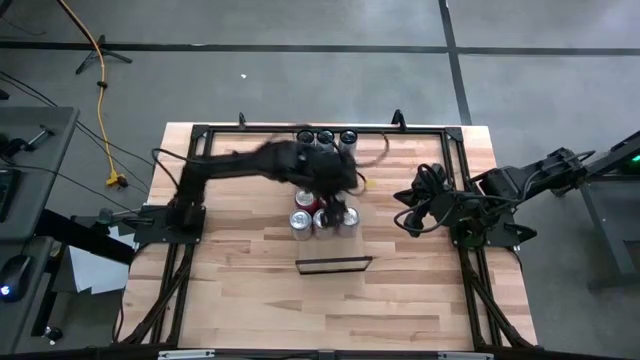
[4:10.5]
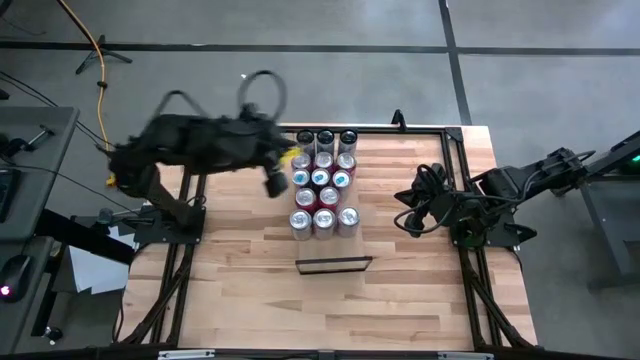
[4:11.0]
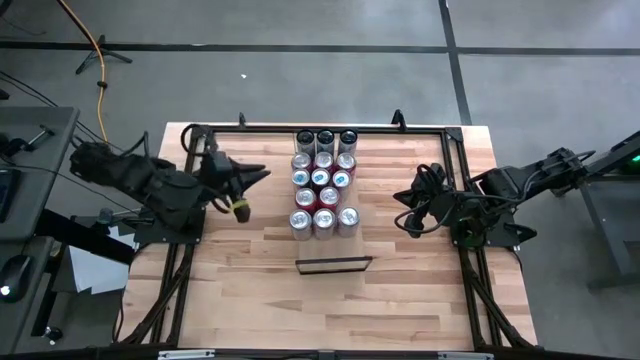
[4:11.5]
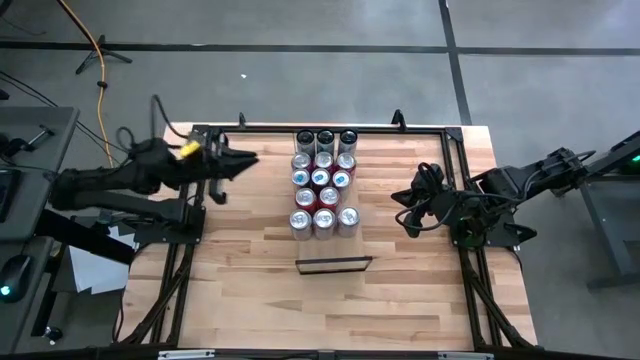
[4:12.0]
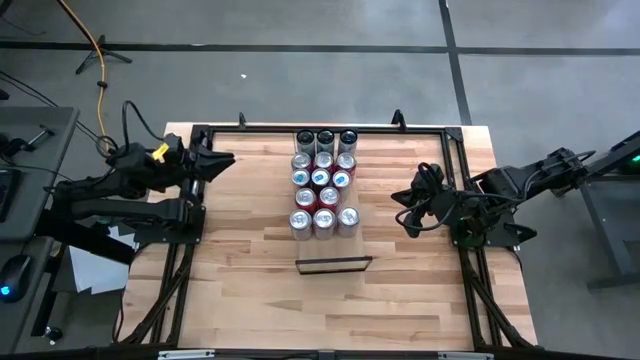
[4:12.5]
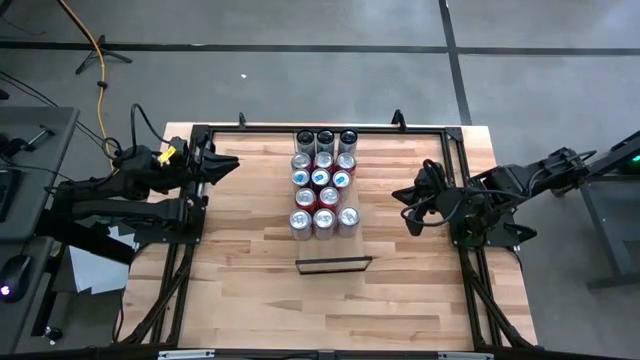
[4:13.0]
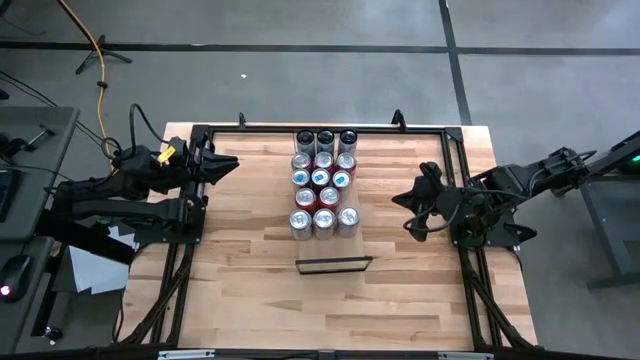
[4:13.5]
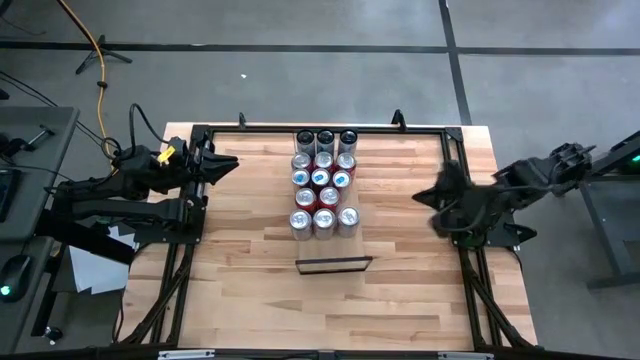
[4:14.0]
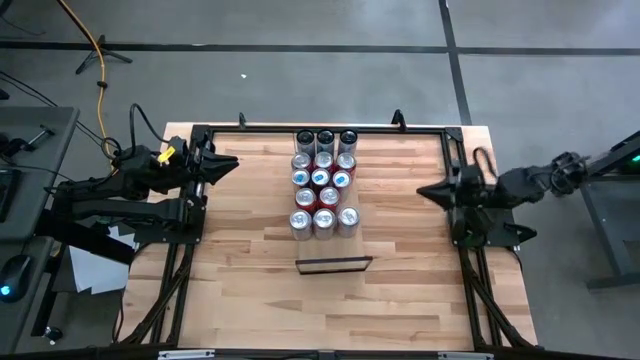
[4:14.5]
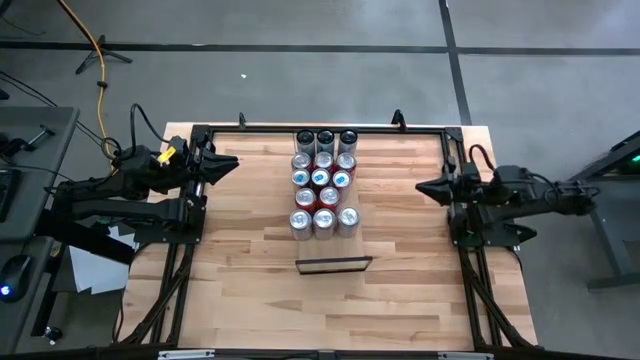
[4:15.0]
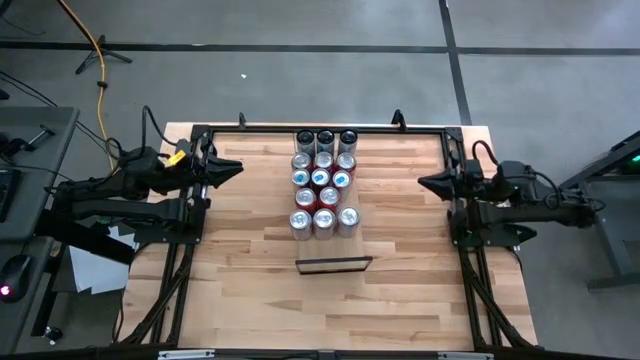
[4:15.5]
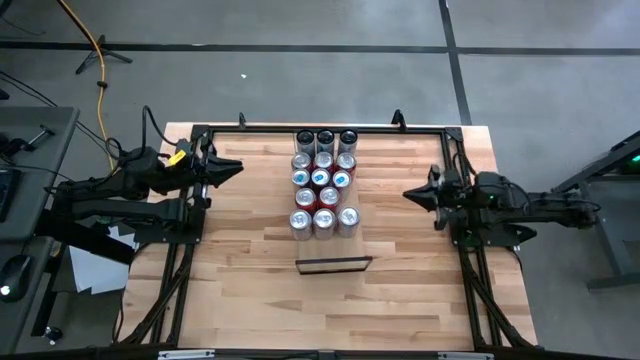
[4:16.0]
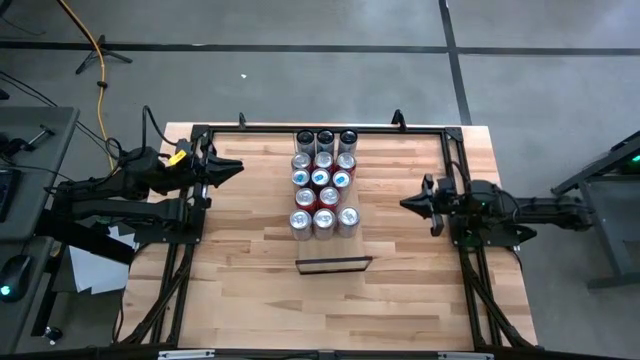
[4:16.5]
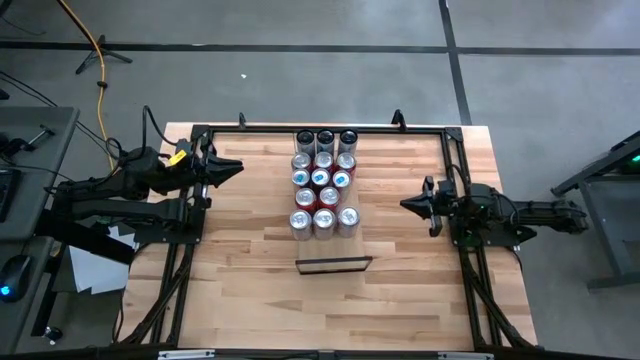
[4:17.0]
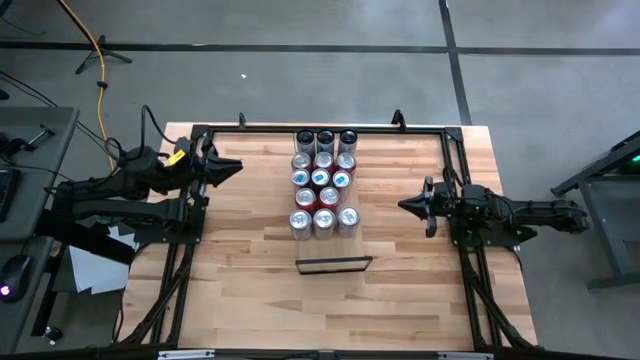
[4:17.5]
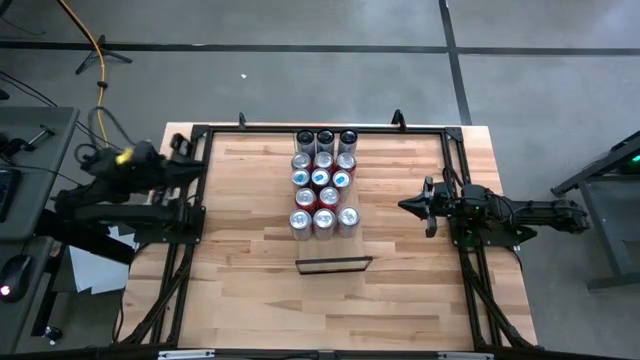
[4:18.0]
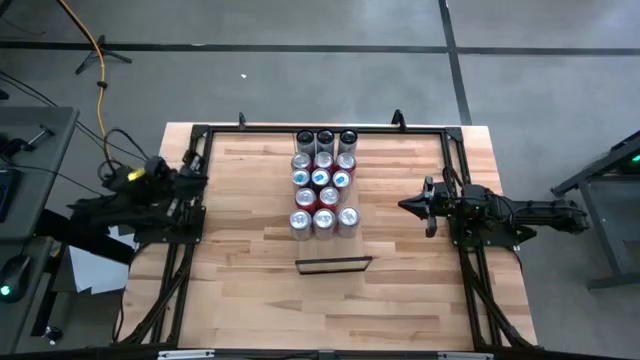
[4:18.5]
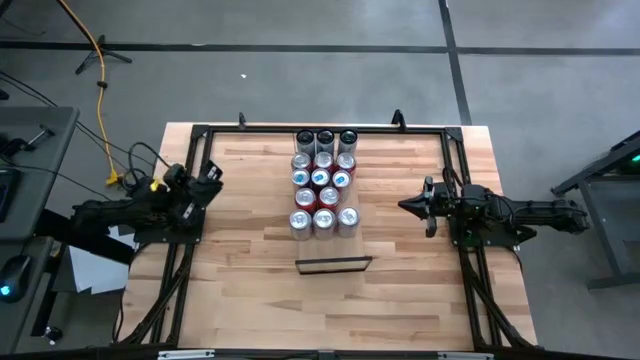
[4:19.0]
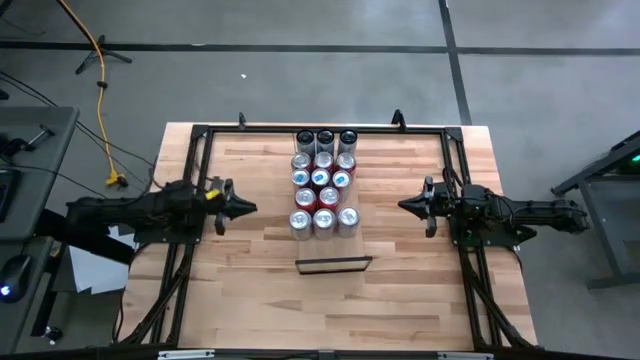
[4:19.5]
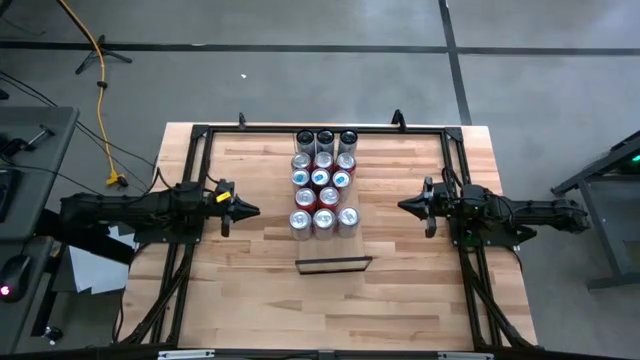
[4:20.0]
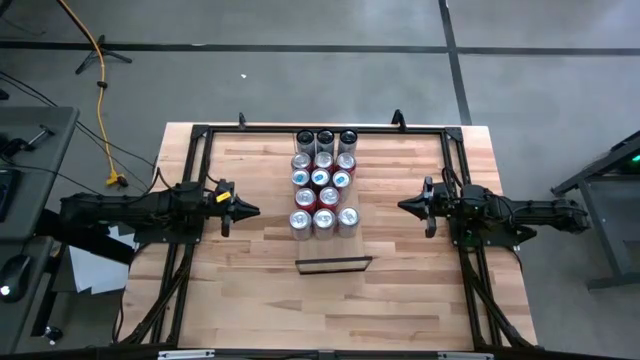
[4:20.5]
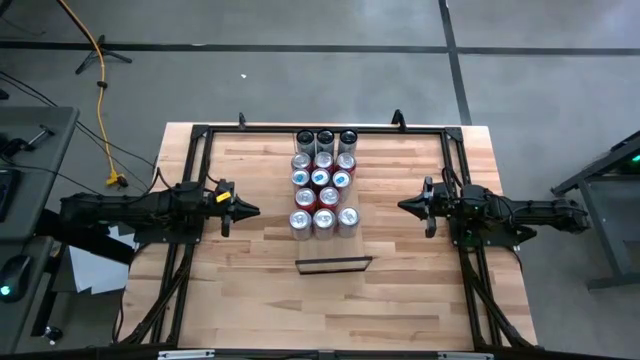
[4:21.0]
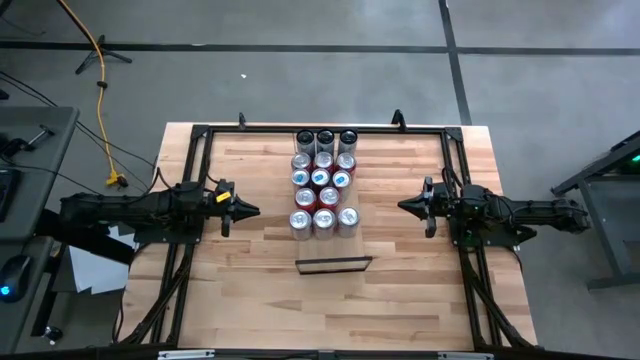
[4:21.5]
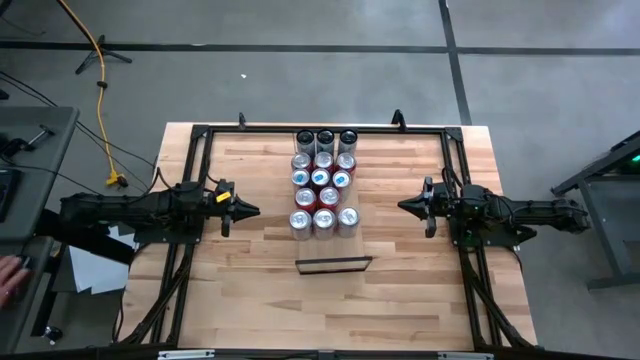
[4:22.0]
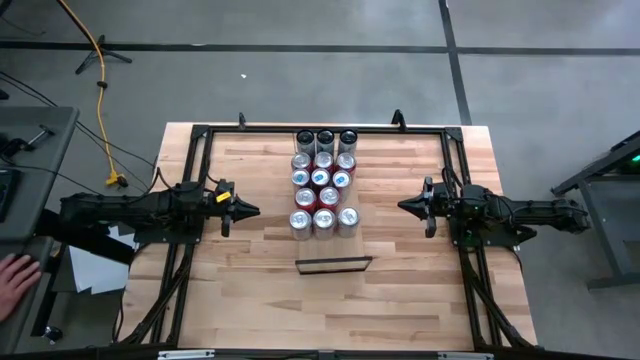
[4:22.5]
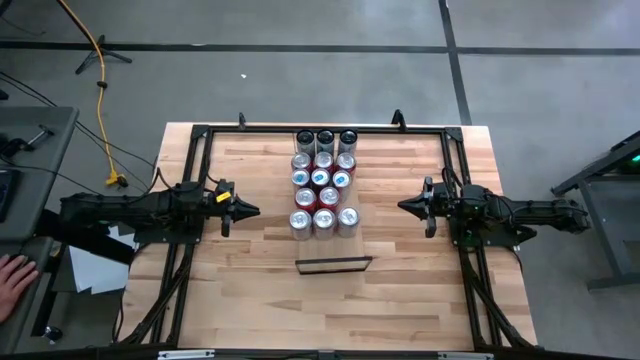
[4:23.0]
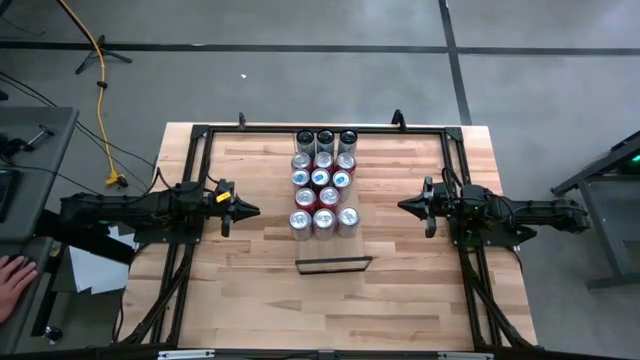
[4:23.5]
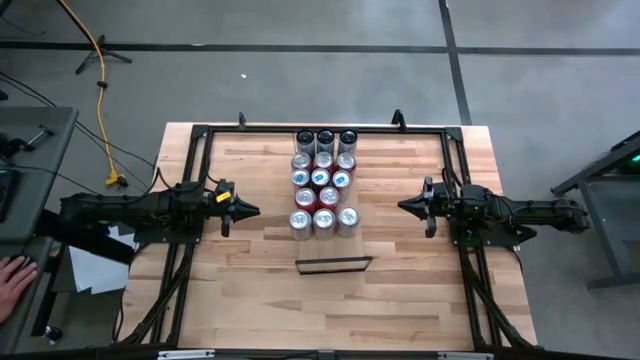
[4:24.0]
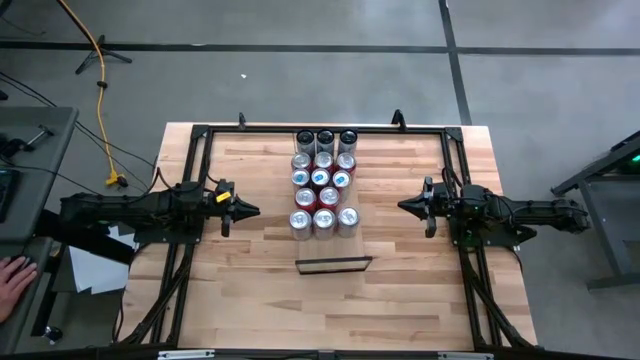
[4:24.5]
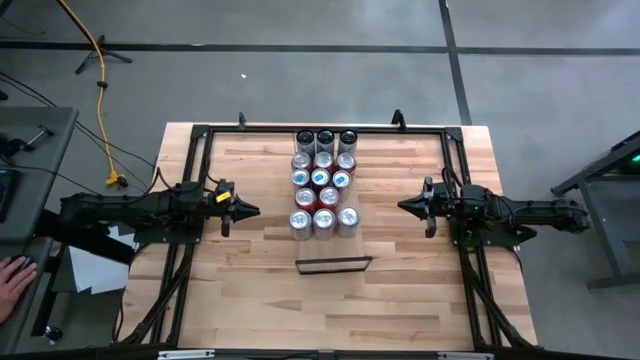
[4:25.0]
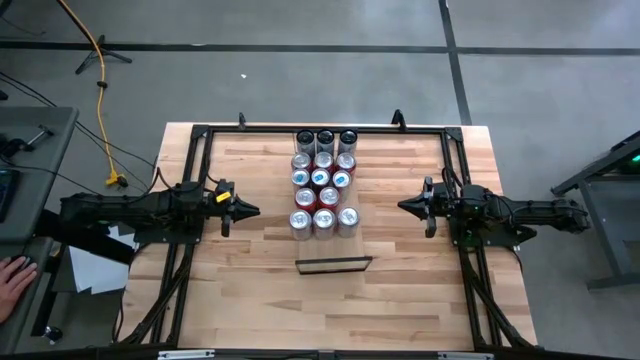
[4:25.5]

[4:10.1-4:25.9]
Task: Place canned beverage on shelf
Return to Home Position

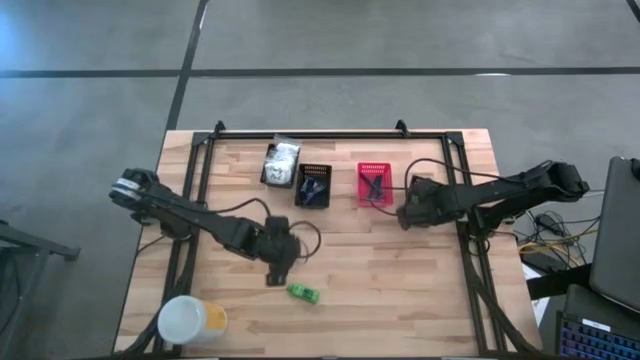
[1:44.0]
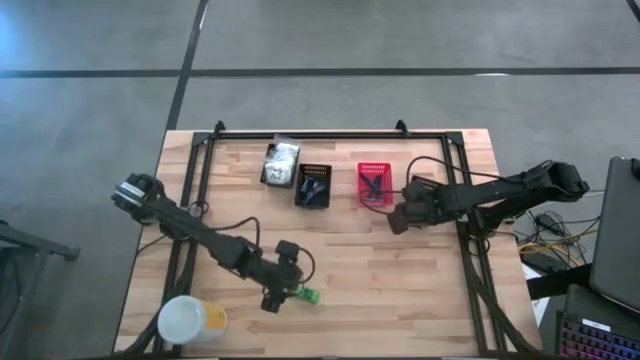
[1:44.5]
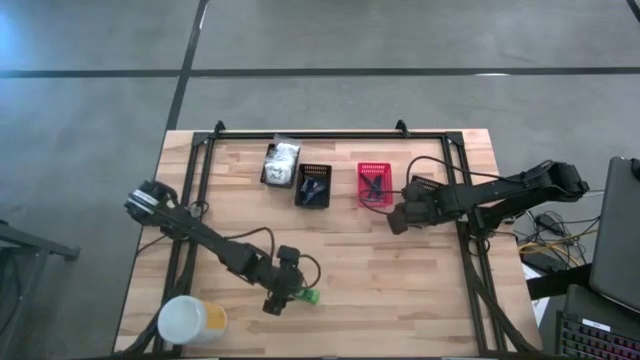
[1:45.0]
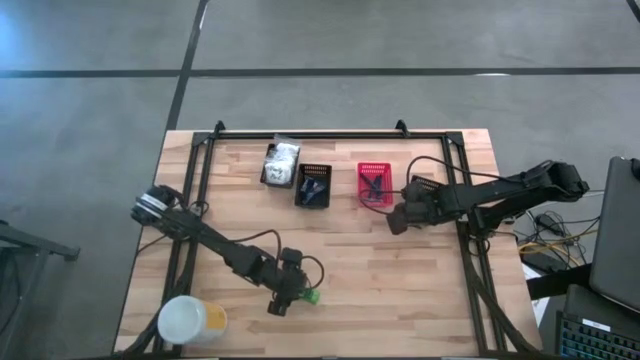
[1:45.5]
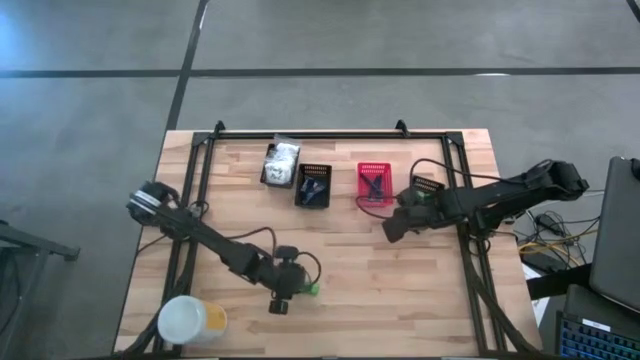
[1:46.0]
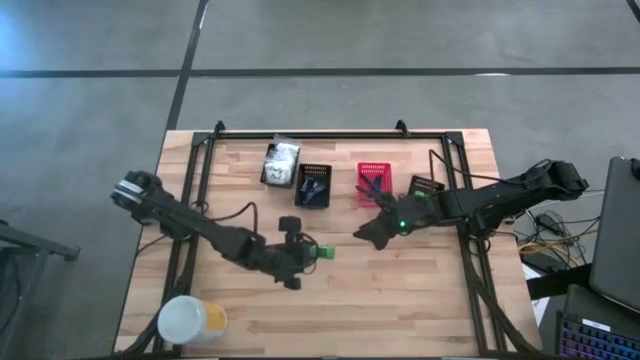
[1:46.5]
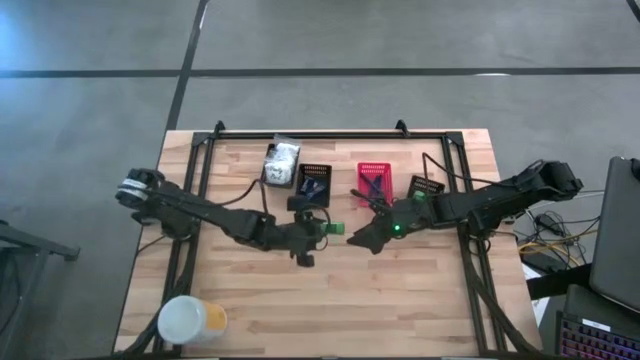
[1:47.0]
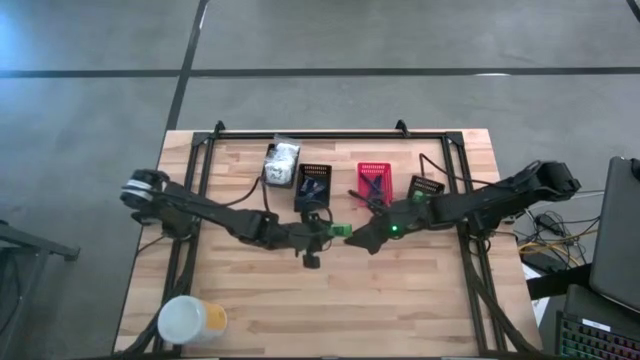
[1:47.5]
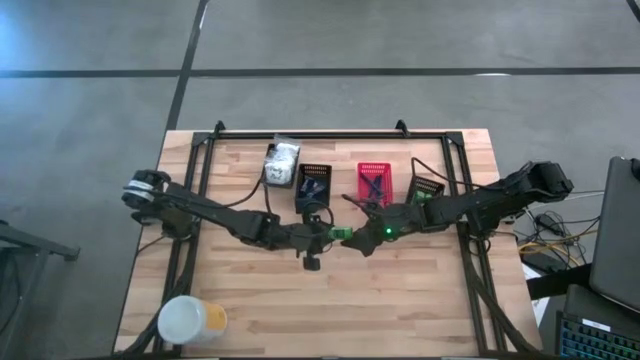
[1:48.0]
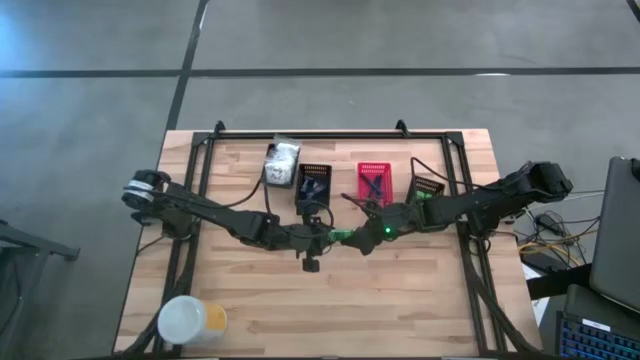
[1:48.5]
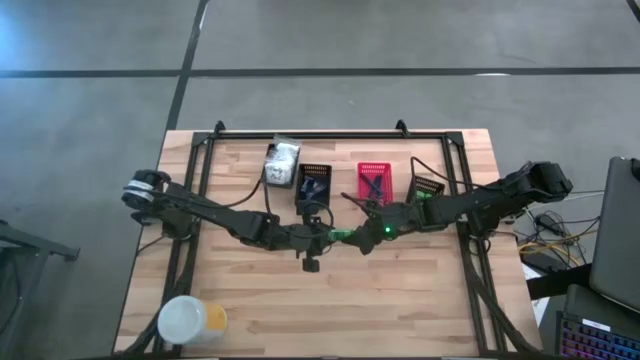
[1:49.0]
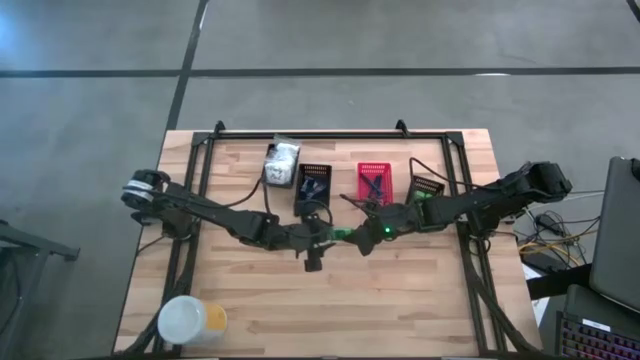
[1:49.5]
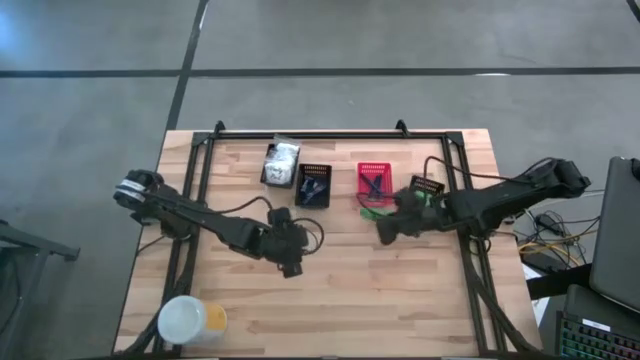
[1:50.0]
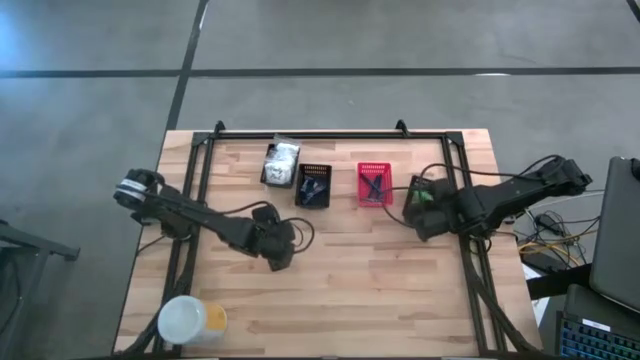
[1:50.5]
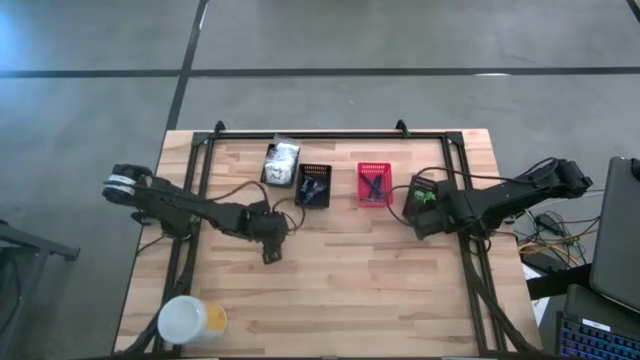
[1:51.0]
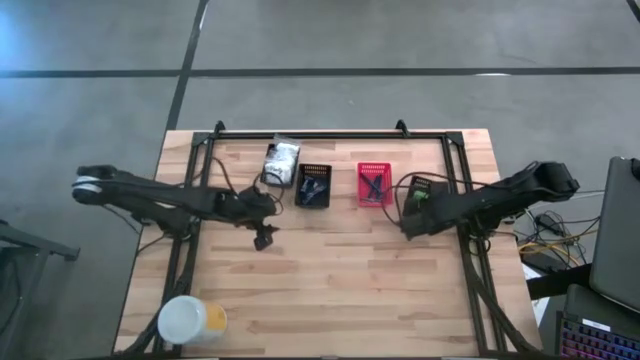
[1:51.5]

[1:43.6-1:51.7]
Task: Pick & Place Travel size toiletries
Put the green shampoo into the right black bin
